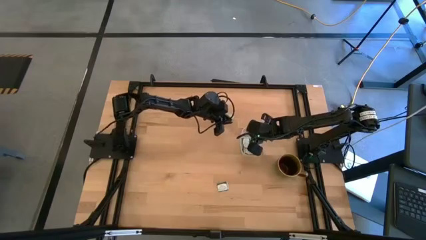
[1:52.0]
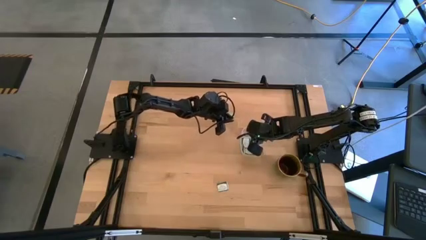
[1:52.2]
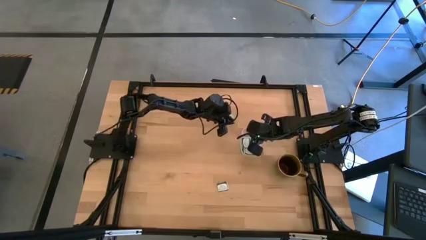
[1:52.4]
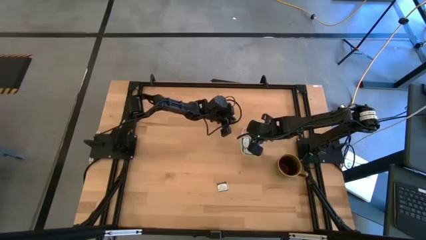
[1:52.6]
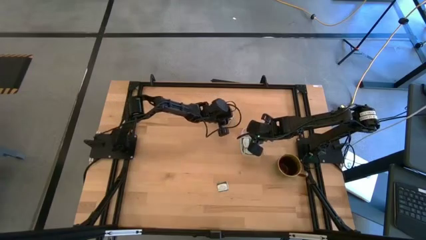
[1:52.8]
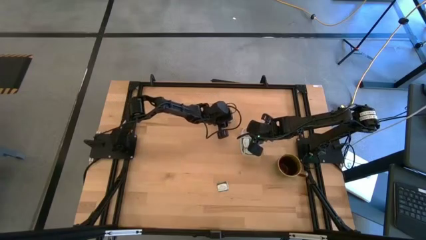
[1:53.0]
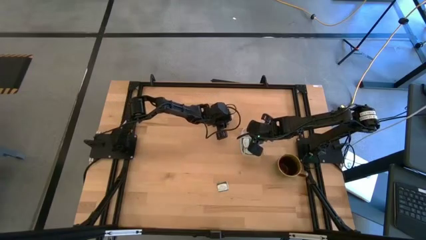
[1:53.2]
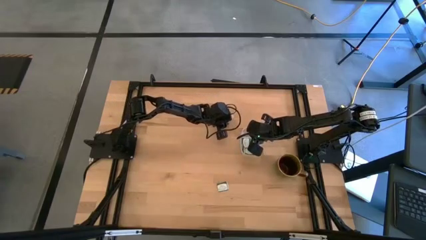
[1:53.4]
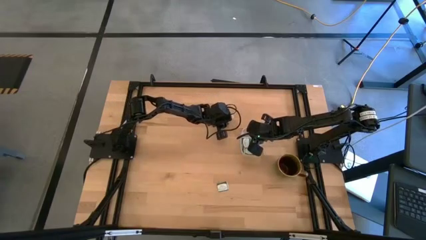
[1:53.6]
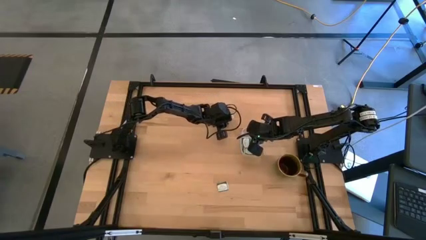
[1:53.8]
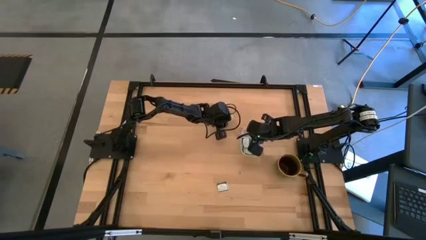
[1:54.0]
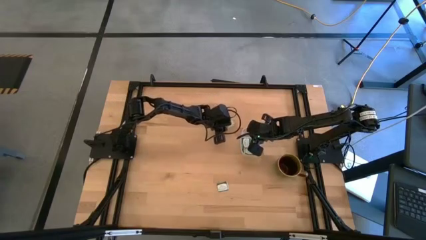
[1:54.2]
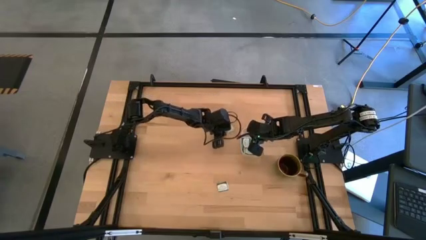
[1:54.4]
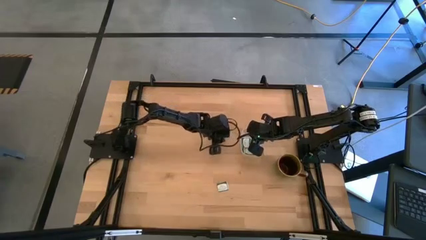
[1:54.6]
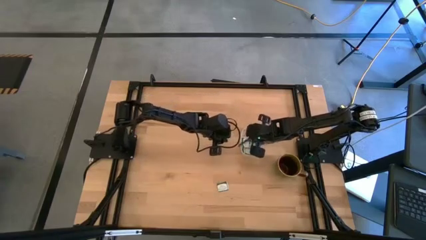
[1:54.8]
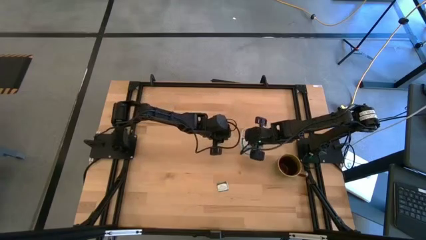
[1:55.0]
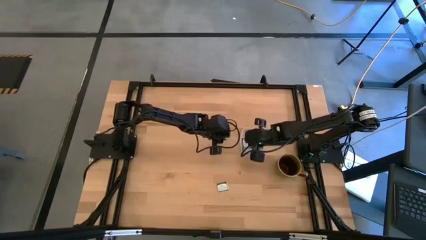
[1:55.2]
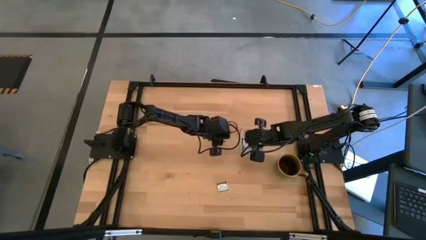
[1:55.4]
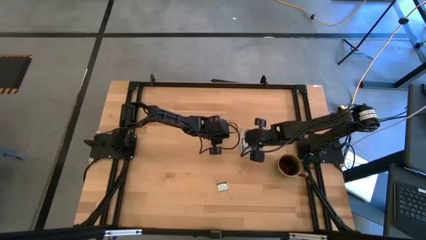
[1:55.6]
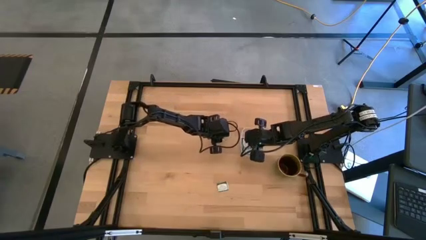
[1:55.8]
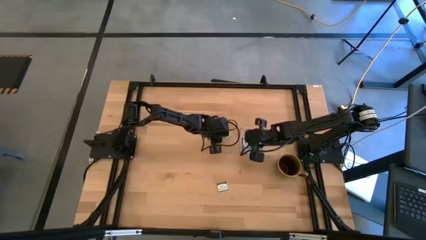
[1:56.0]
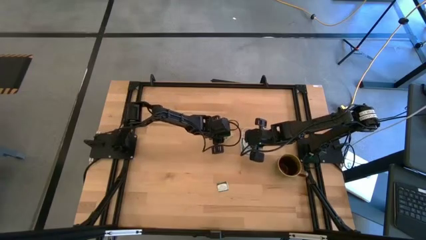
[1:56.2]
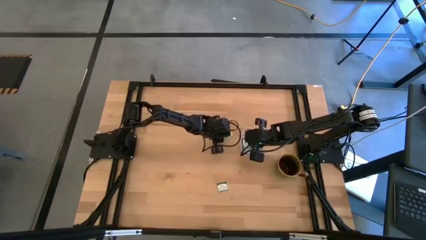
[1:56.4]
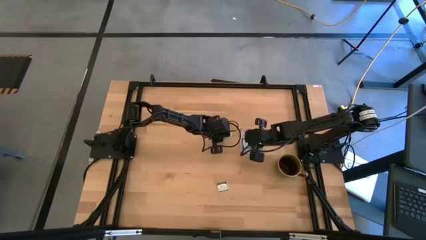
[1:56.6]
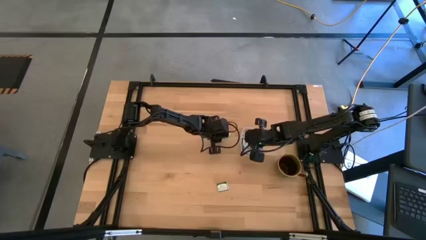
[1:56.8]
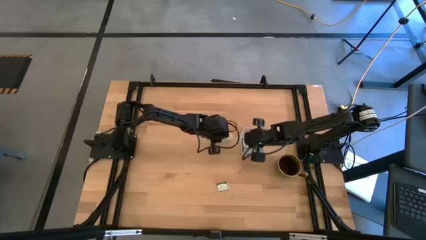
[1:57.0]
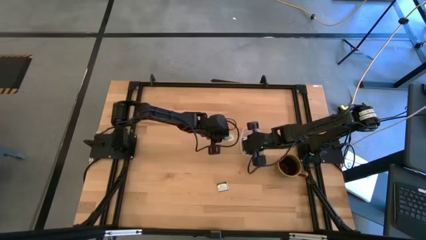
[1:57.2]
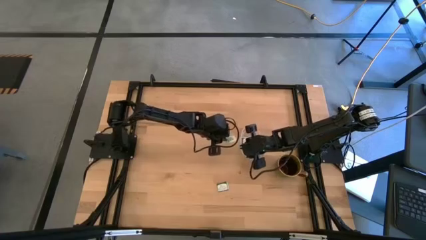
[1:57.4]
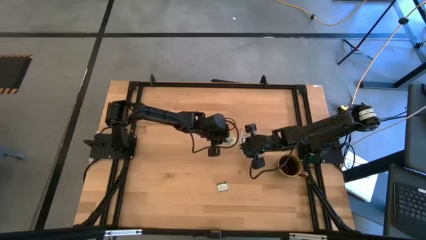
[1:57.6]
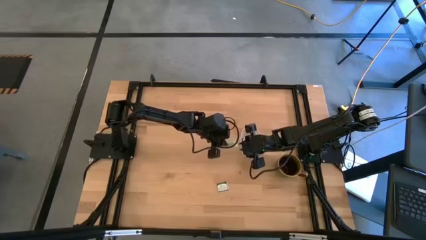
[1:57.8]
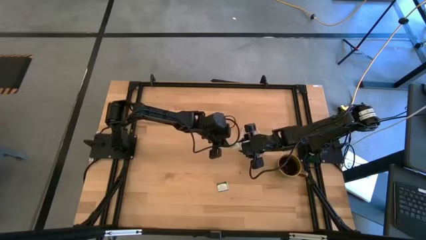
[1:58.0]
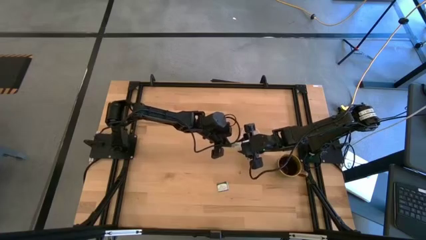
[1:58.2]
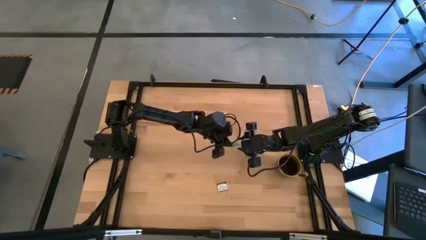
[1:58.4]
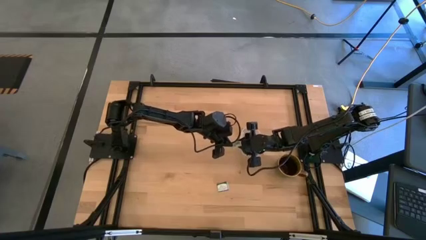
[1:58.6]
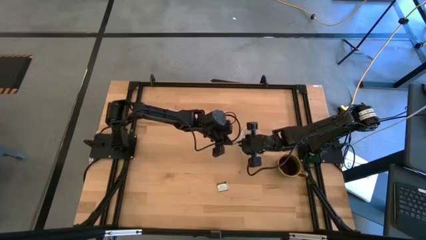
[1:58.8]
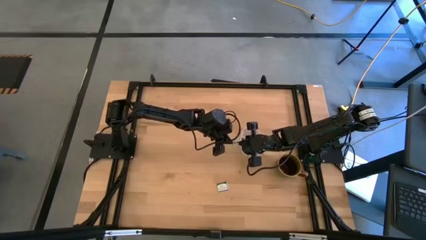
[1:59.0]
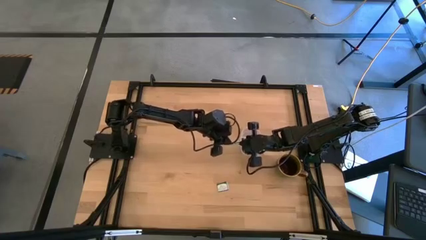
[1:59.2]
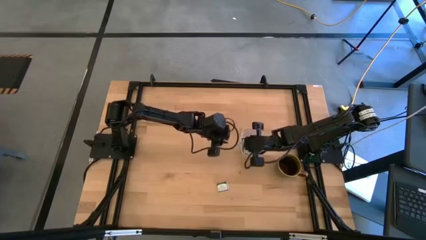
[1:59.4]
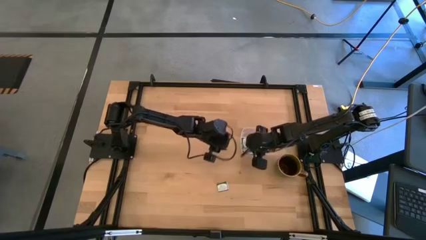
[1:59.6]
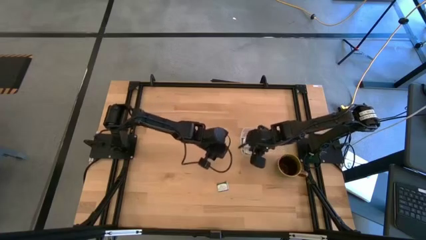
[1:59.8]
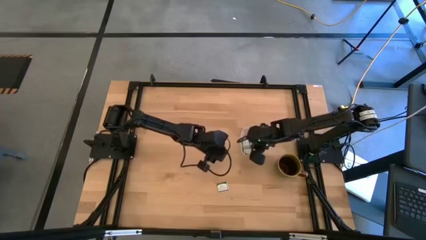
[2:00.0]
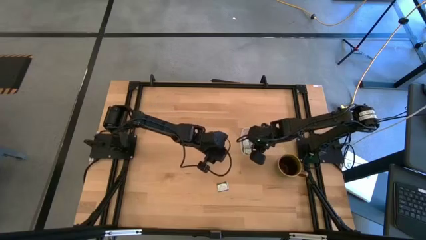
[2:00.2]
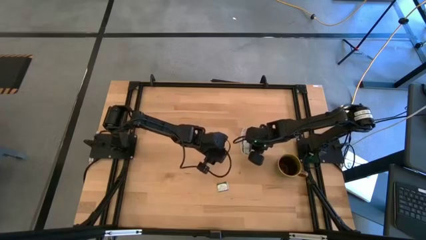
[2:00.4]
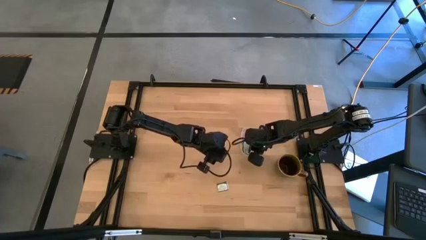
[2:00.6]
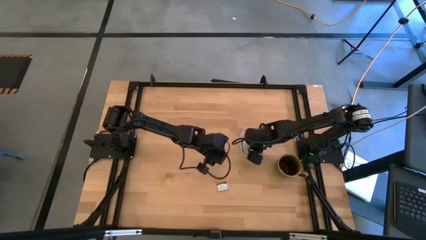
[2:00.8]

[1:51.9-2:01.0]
Task: Pick and place items into bin
Put the stevia packet into the transparent bin

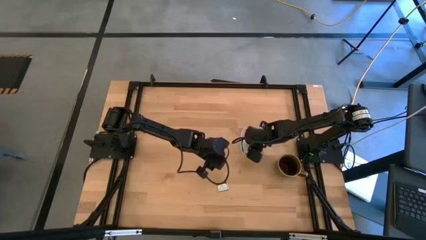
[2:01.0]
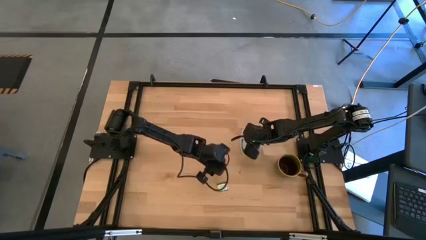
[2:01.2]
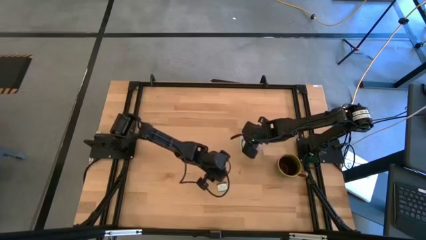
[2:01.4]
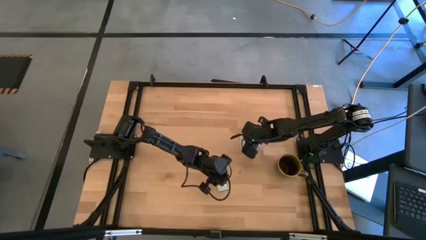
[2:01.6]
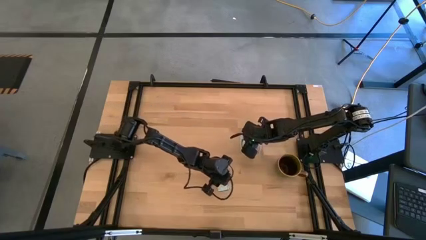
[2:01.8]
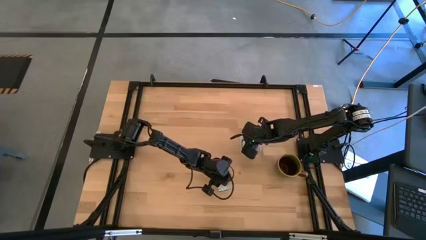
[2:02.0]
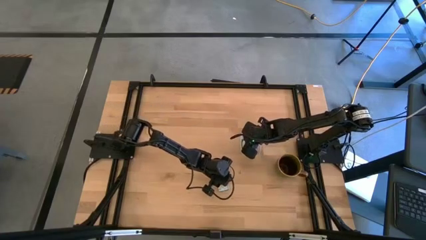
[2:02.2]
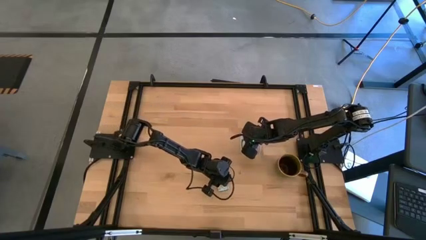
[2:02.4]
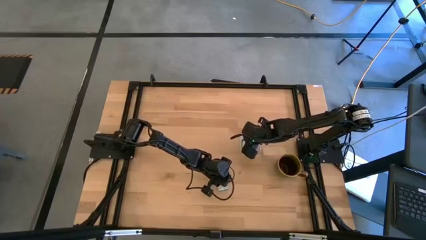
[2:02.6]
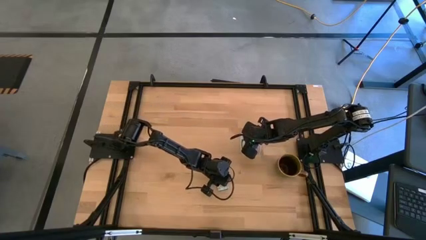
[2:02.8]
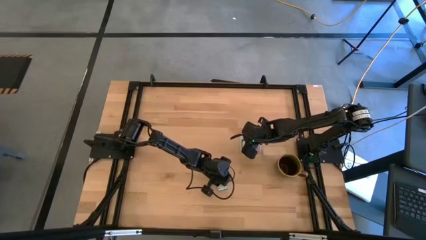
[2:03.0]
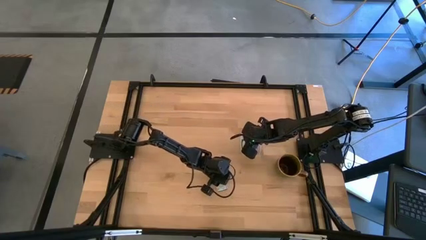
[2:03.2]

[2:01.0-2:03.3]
Put the truvia packet into the transparent bin

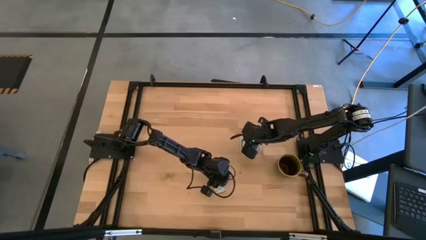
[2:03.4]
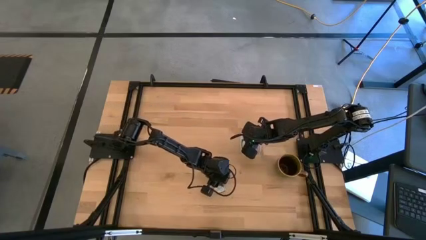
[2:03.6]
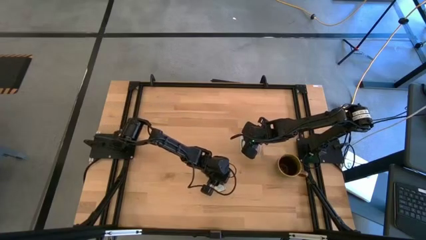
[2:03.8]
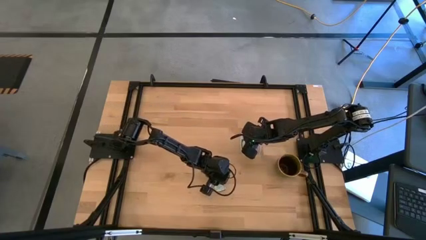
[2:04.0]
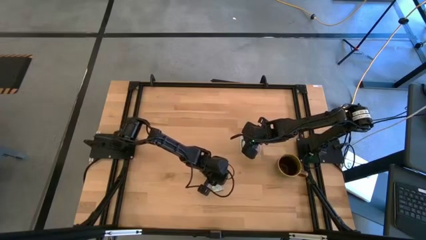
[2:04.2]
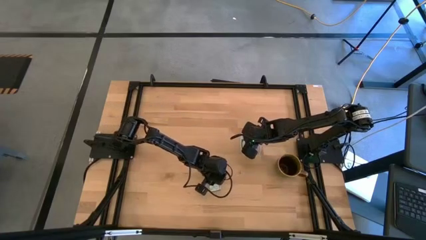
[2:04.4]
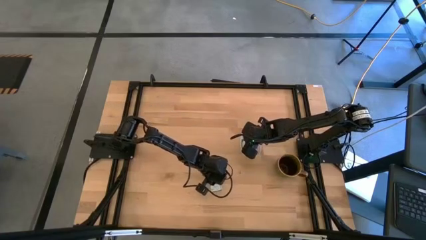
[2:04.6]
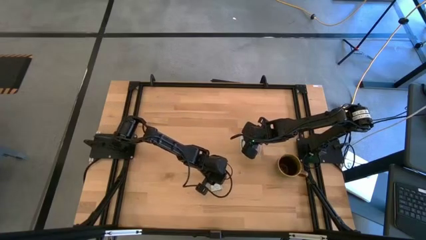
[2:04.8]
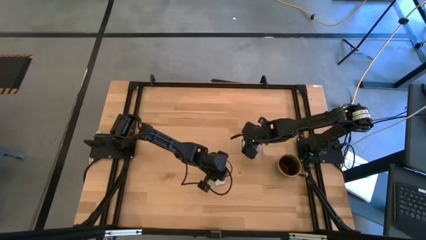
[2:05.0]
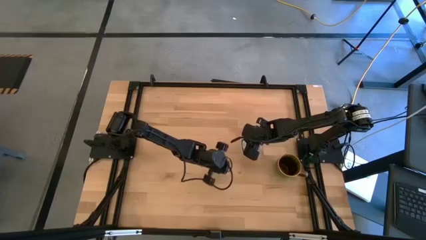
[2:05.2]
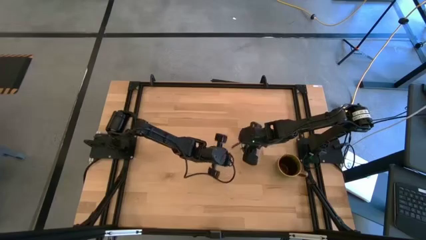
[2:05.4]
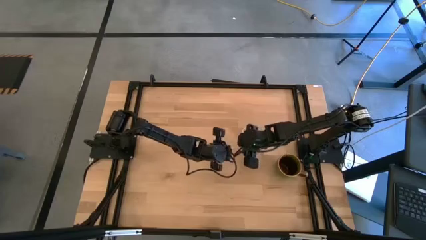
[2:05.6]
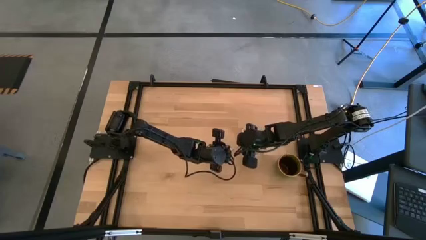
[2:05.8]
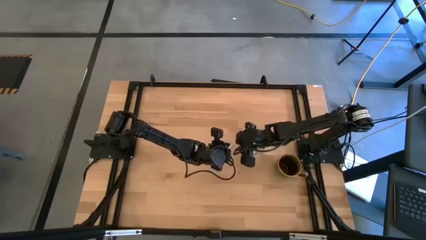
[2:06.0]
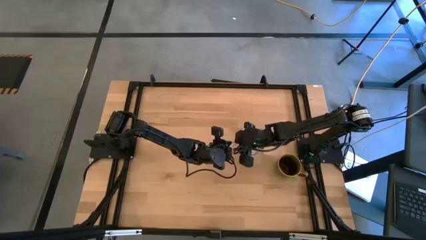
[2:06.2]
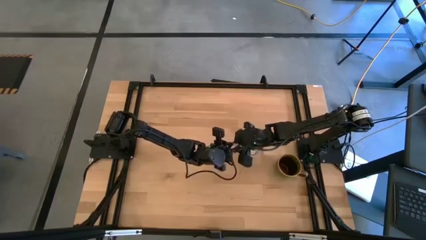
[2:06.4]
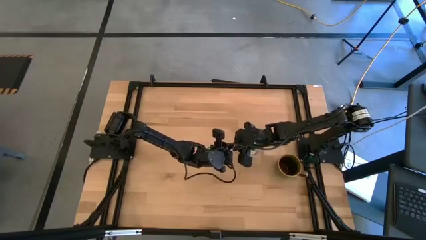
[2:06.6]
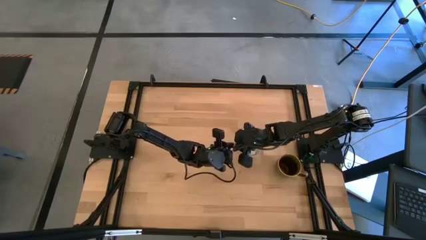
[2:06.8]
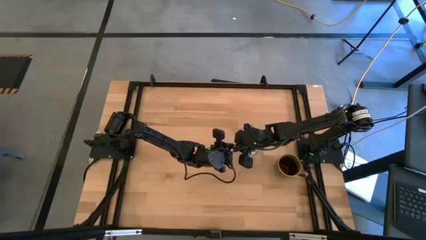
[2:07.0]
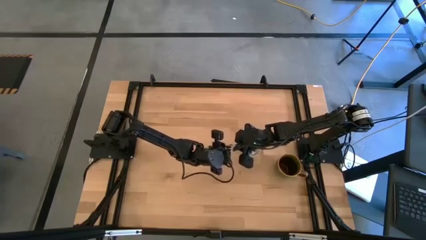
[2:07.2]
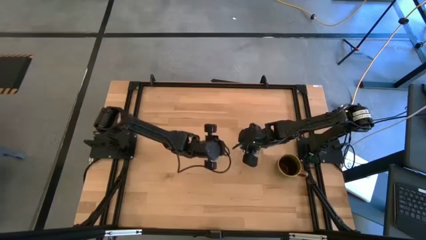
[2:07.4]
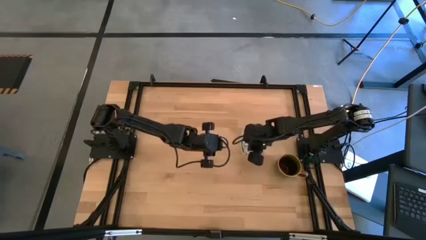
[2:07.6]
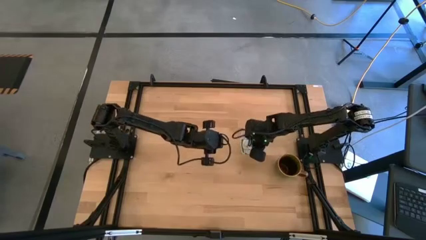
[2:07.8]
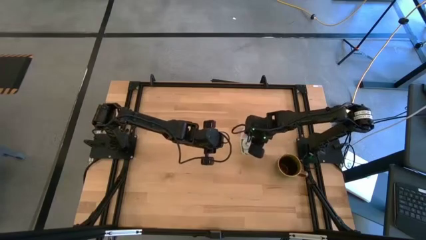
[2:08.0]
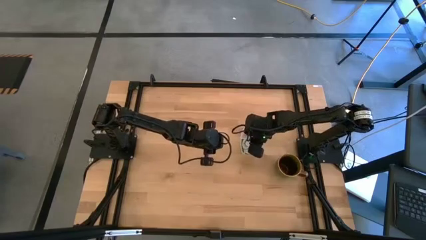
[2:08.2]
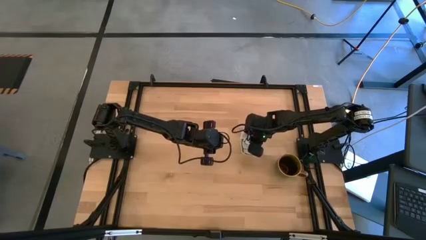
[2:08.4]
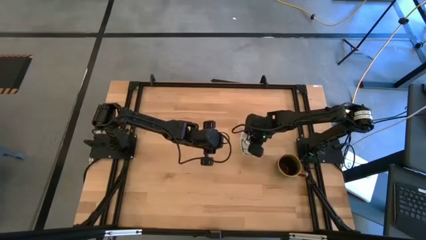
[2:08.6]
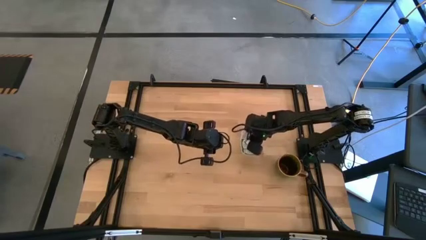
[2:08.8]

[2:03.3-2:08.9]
Put the truvia packet into the transparent bin
